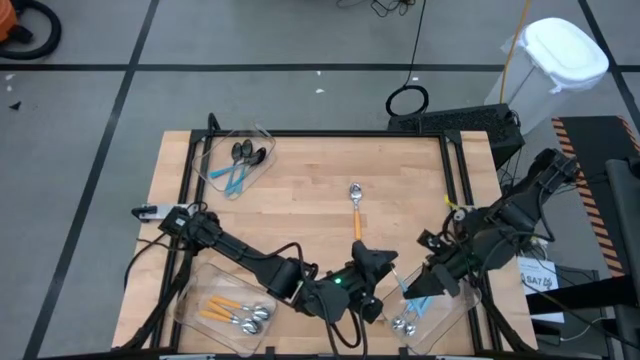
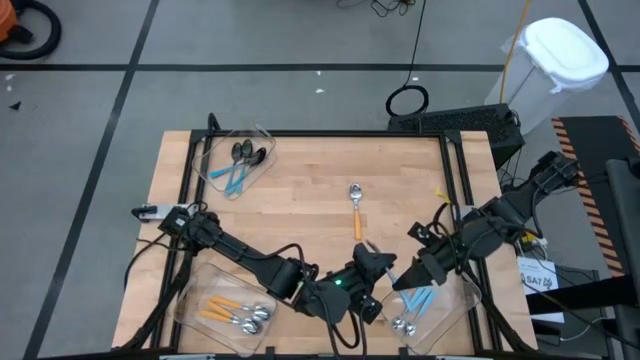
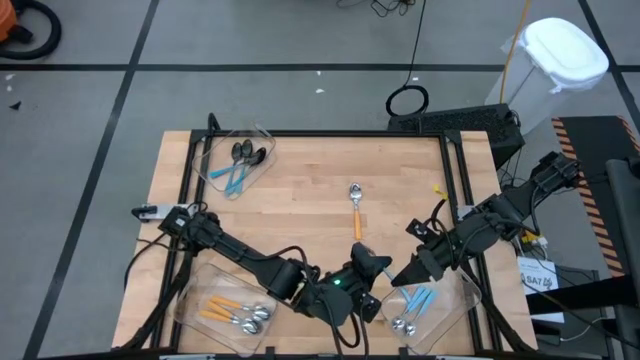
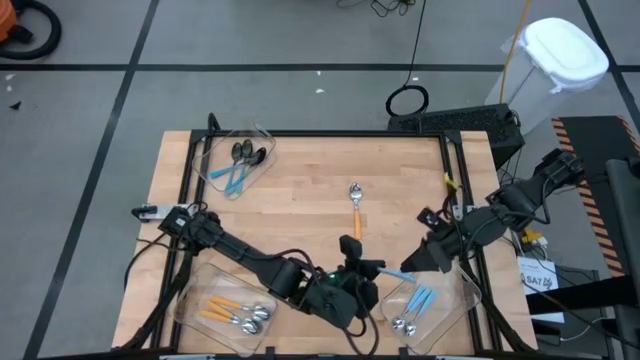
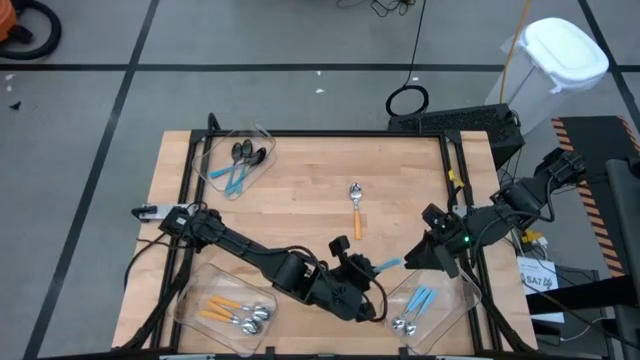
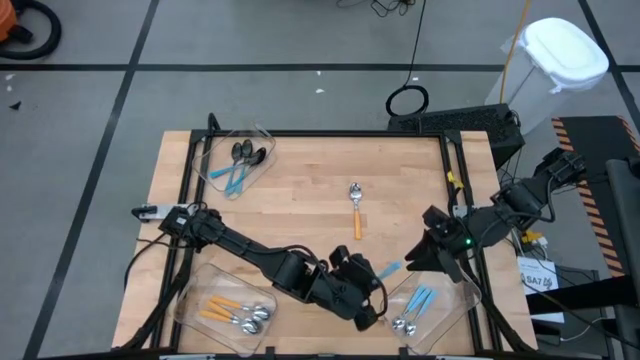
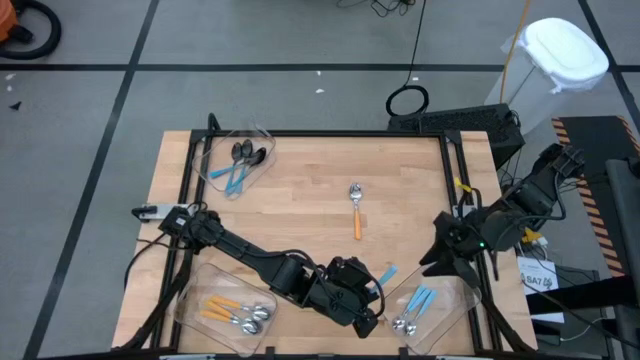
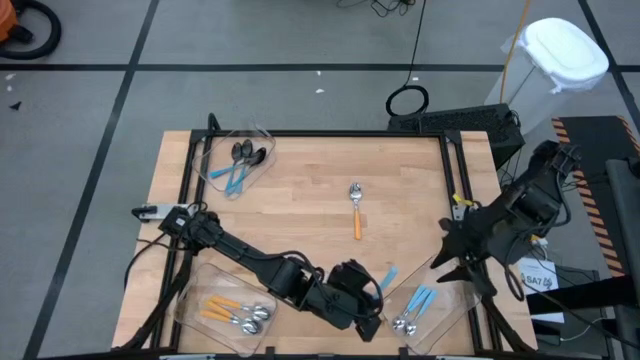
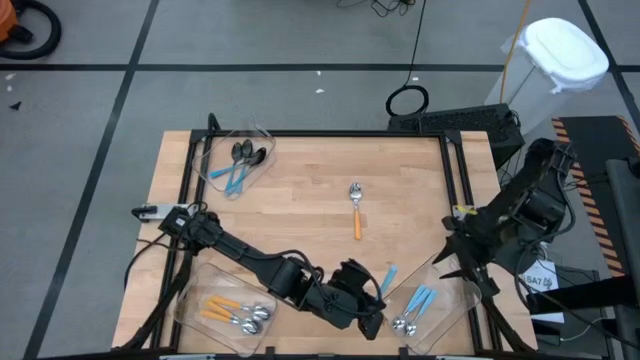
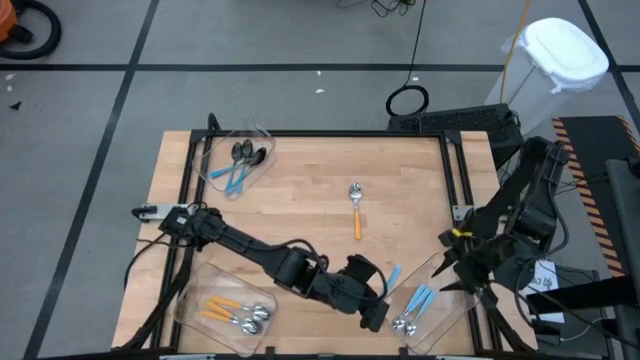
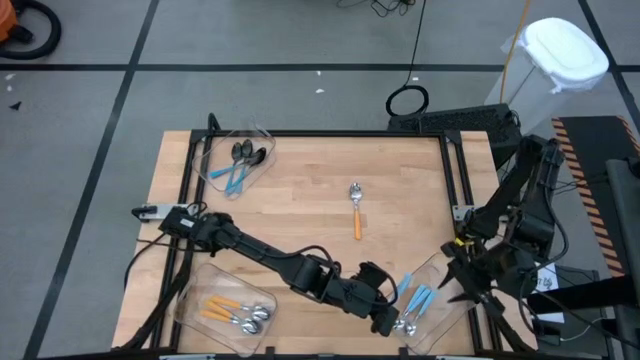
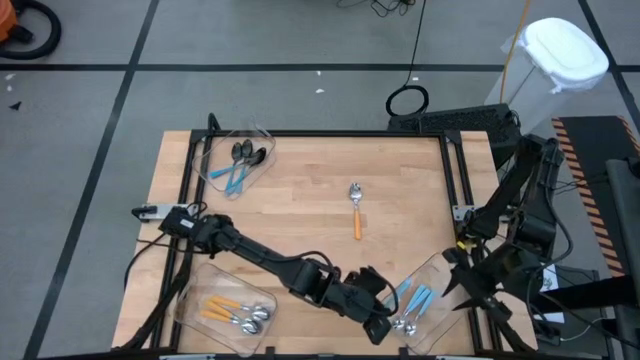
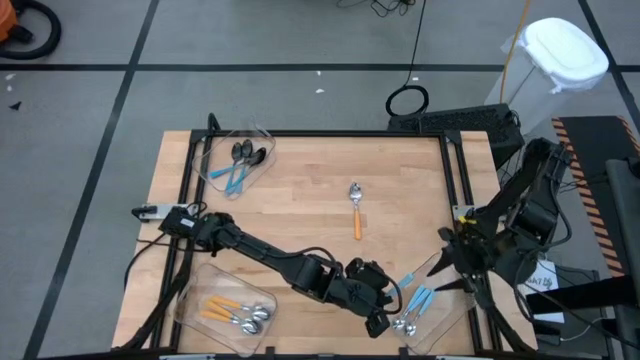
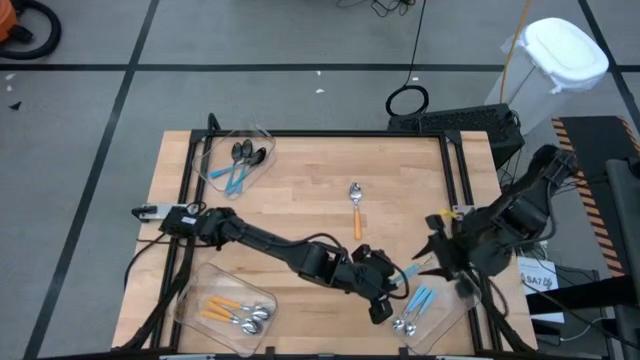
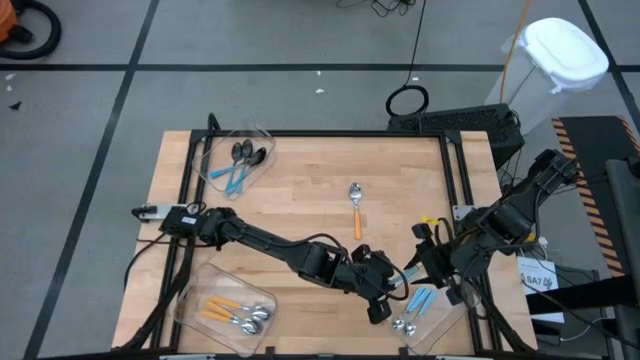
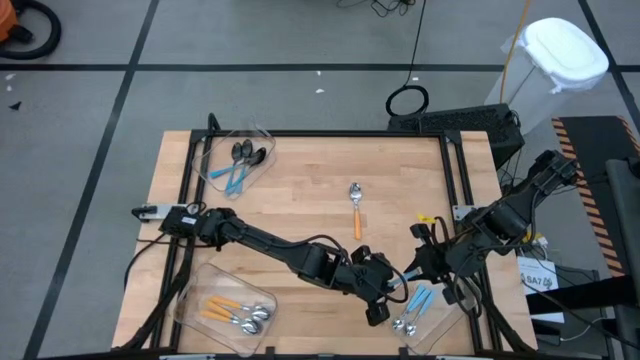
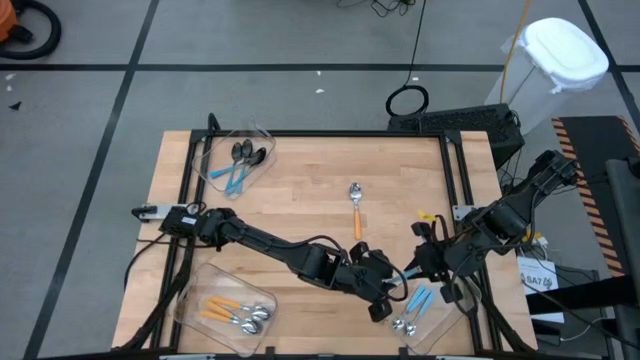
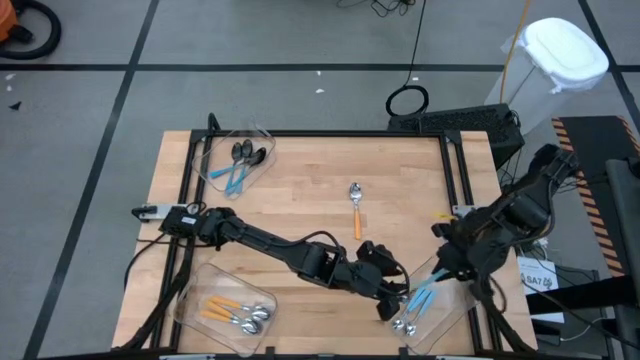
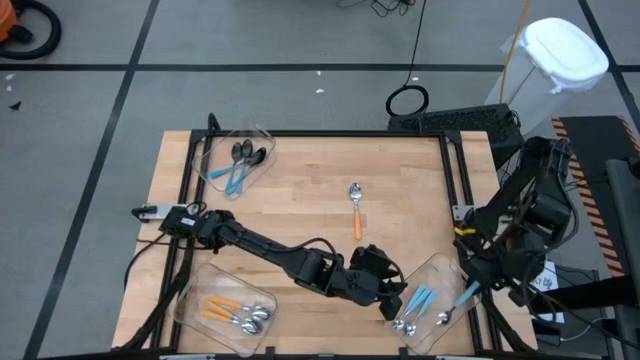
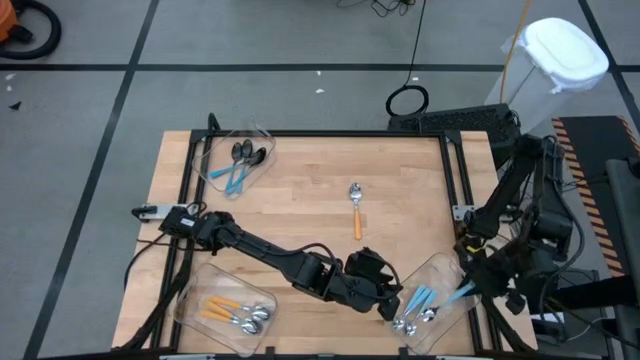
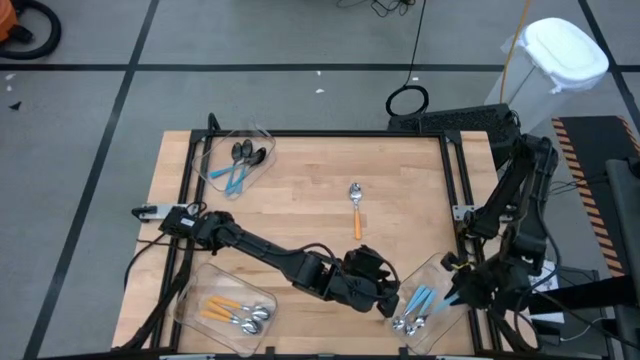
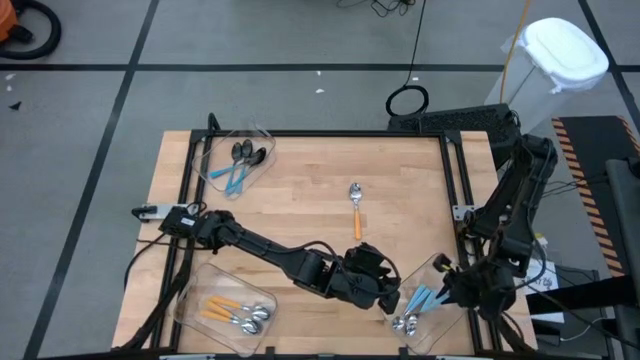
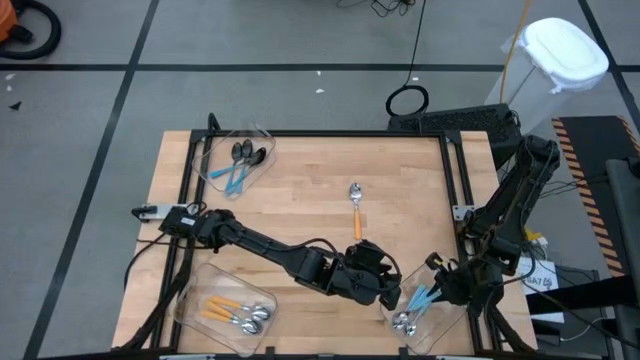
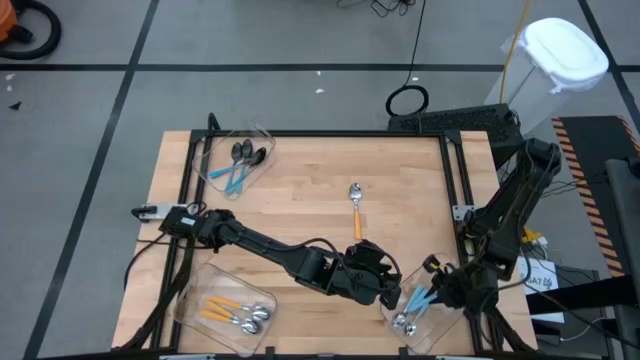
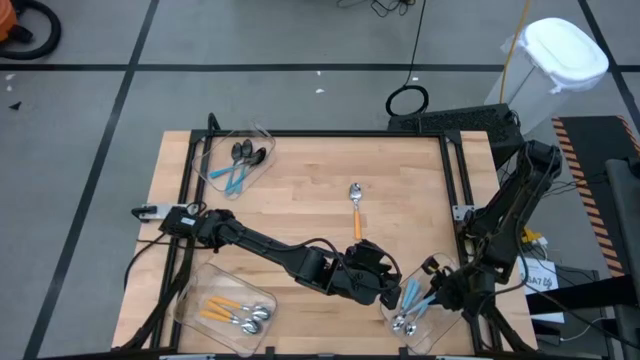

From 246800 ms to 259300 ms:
Task: Sort silverware by color (type)
Put the light blue spoon into the bottom right transparent bin

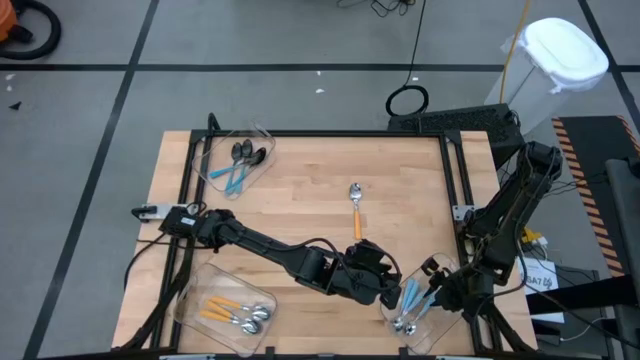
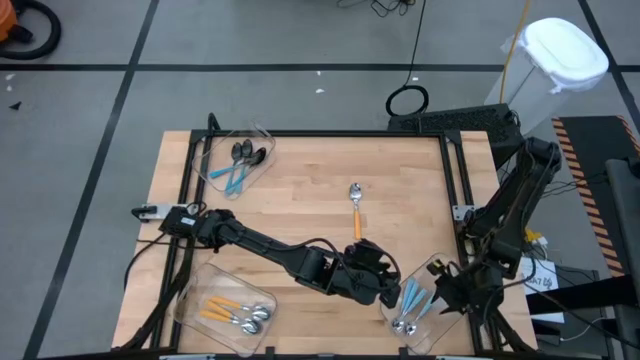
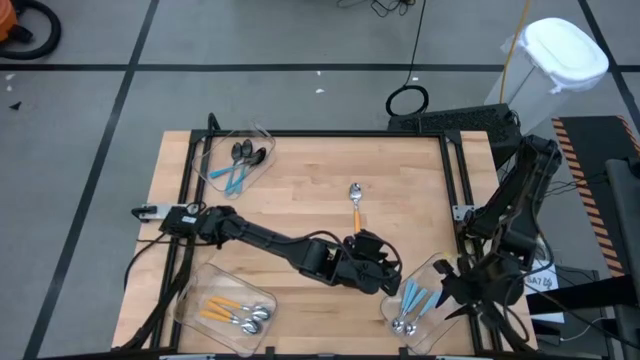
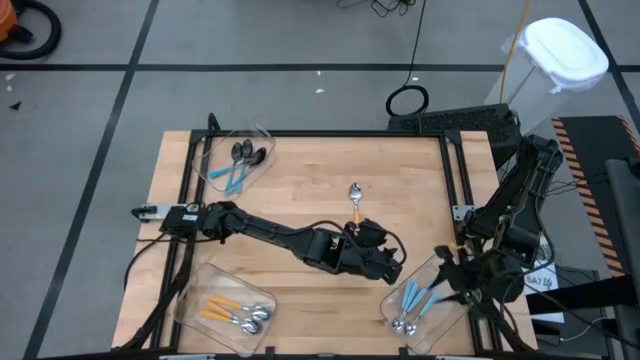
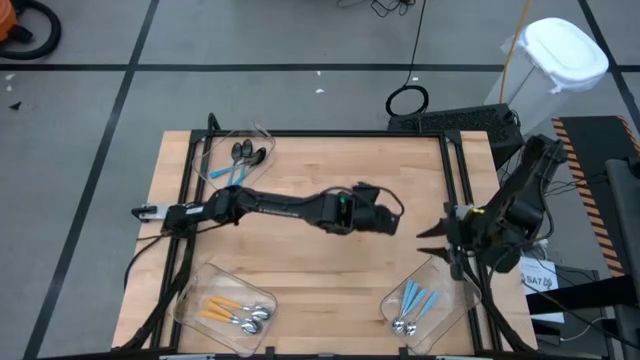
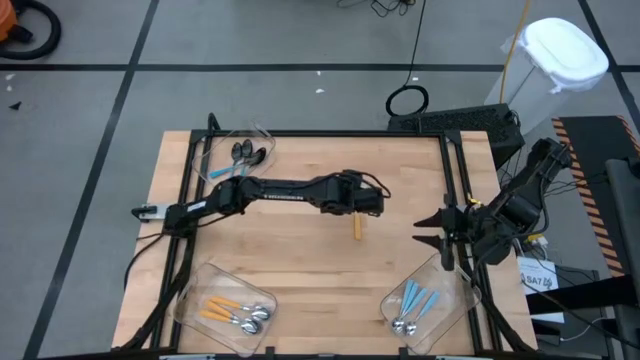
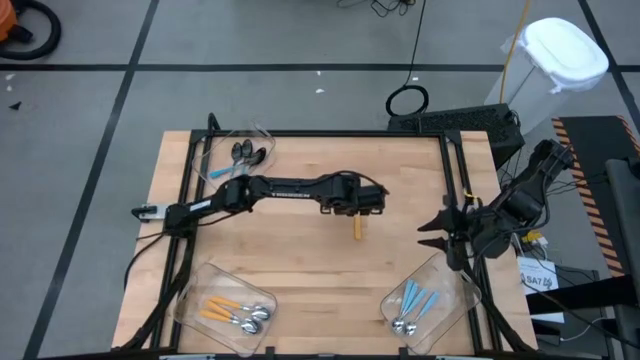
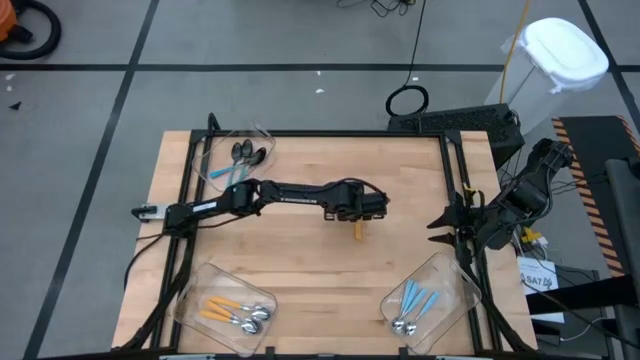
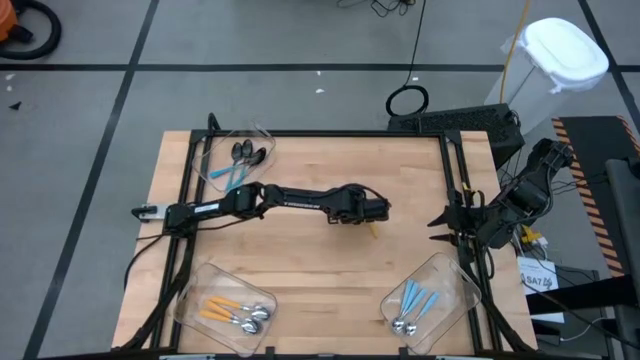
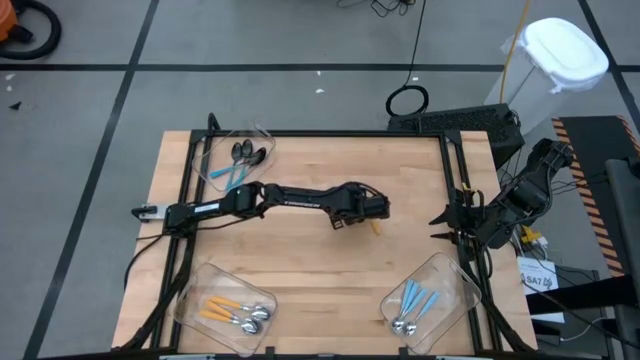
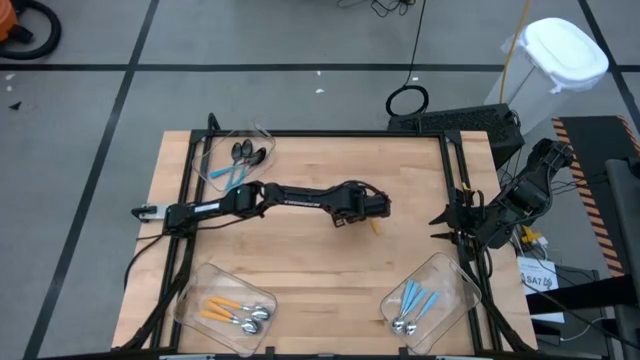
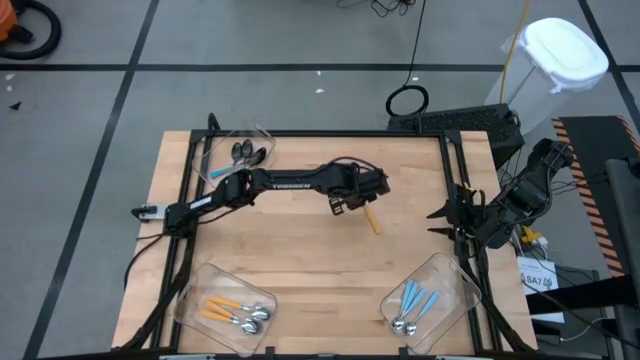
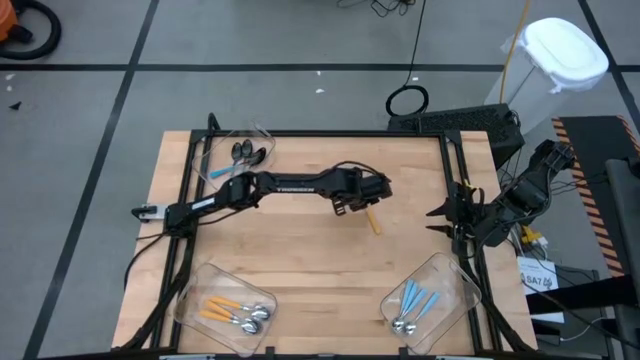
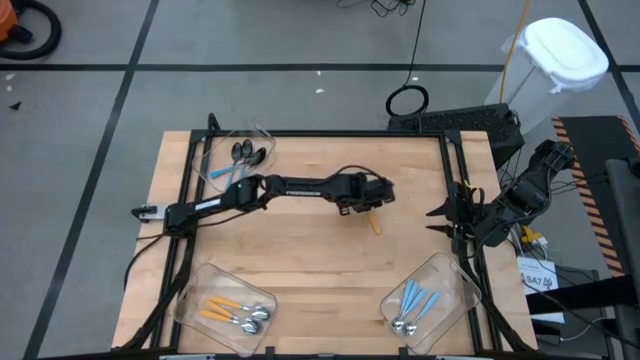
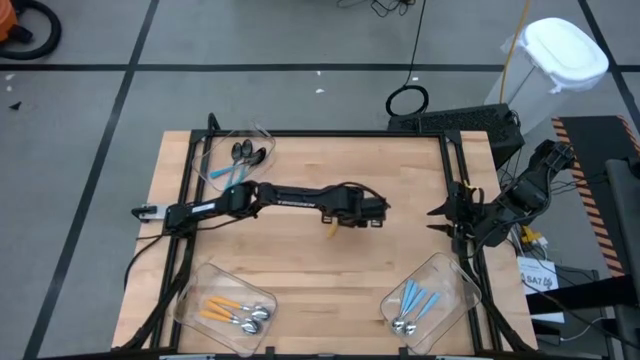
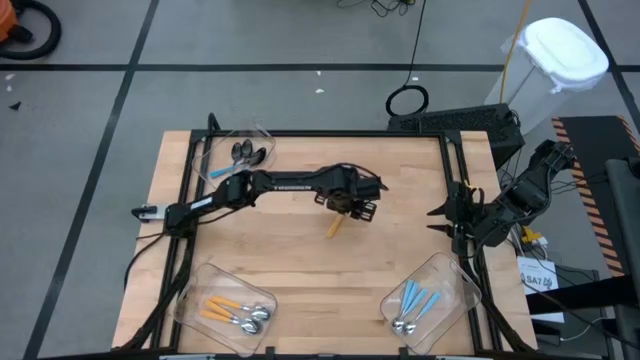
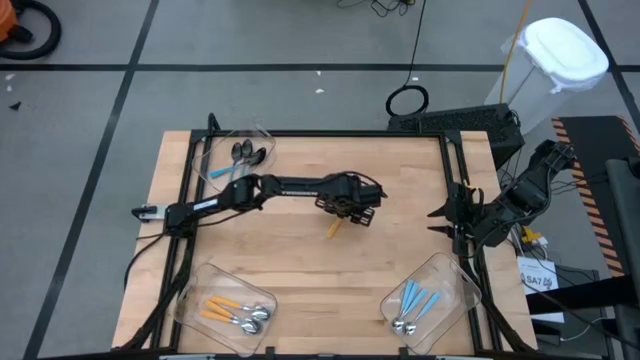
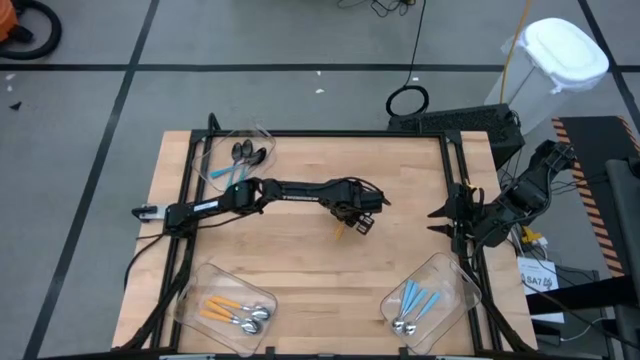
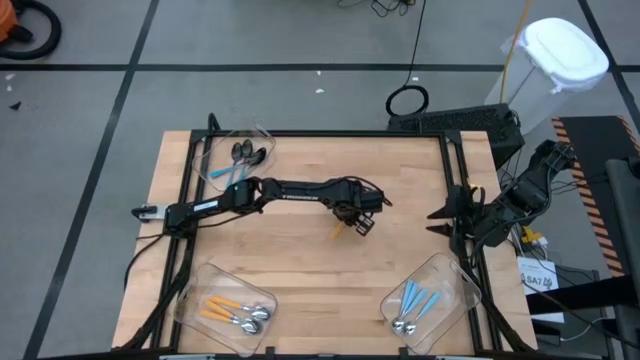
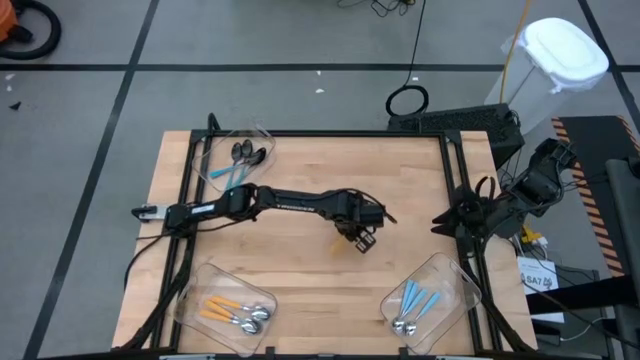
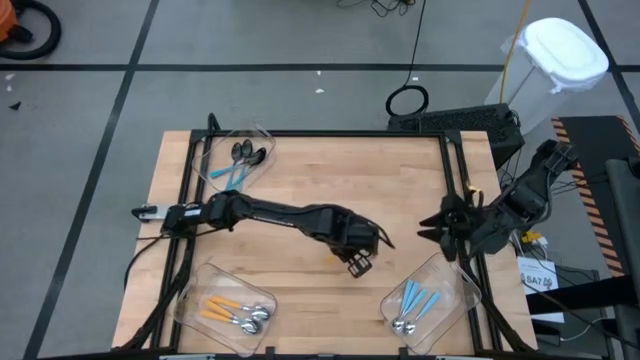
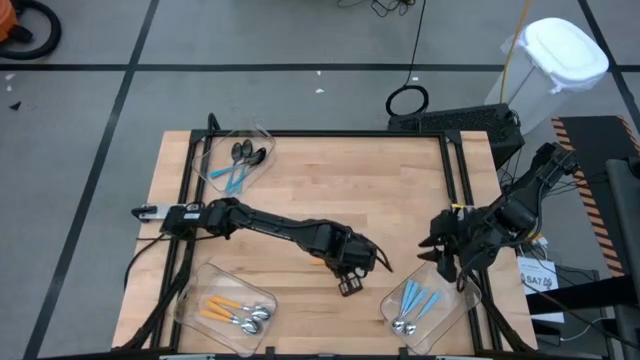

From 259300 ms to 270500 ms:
Put the yellow spoon into the bottom left transparent bin
